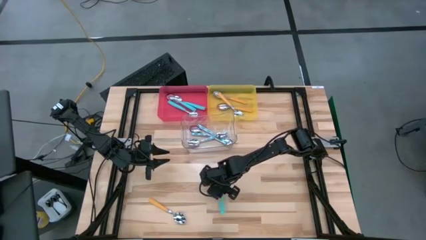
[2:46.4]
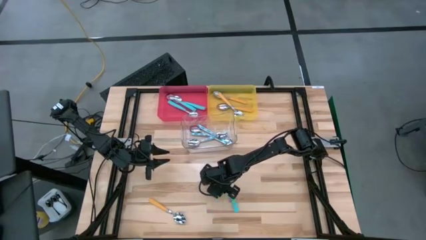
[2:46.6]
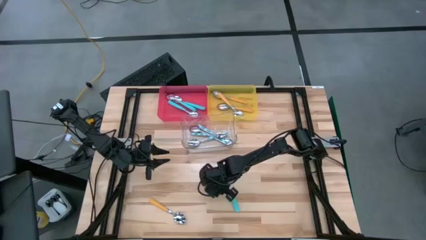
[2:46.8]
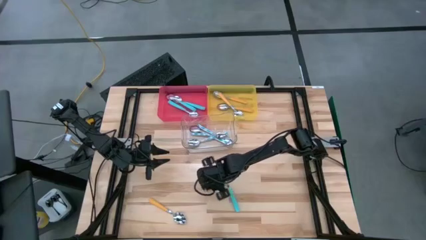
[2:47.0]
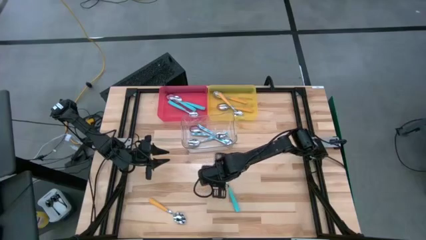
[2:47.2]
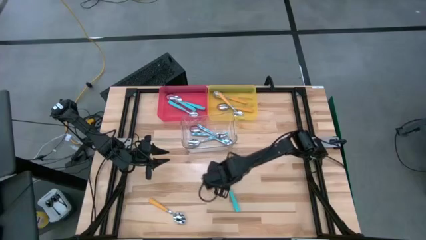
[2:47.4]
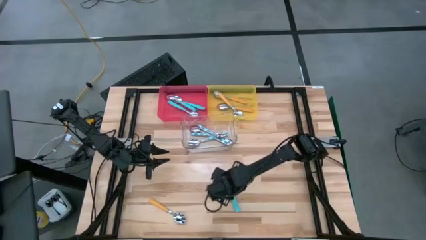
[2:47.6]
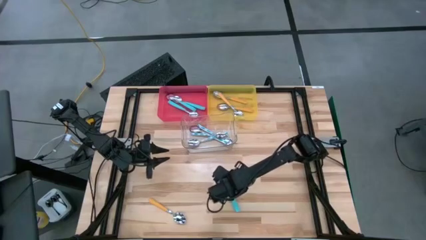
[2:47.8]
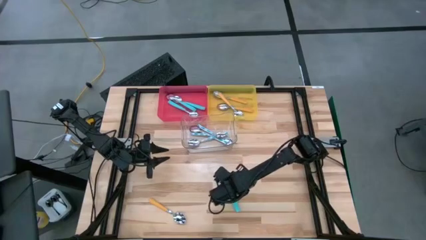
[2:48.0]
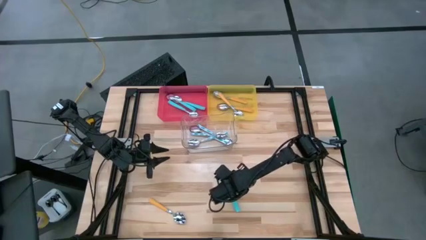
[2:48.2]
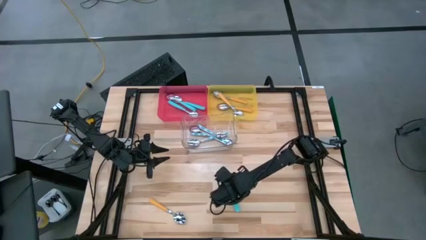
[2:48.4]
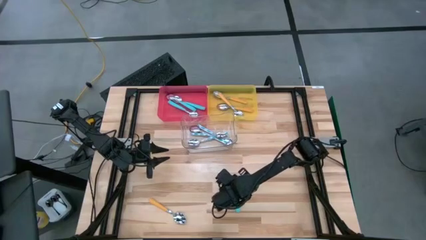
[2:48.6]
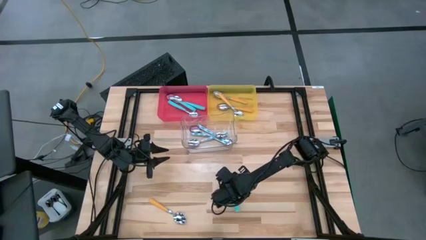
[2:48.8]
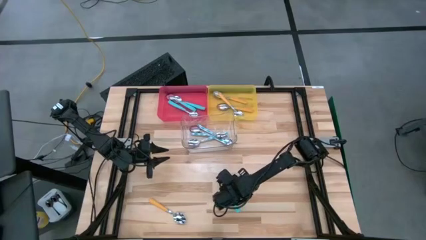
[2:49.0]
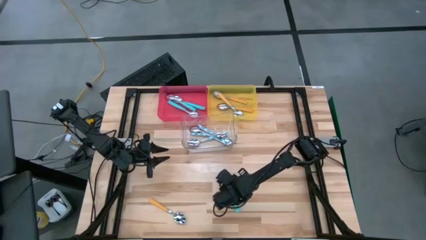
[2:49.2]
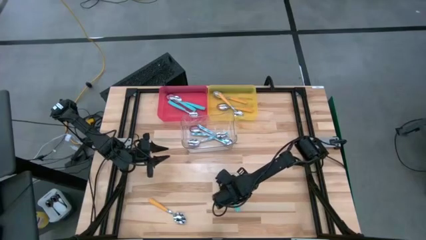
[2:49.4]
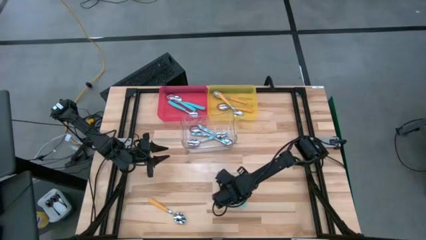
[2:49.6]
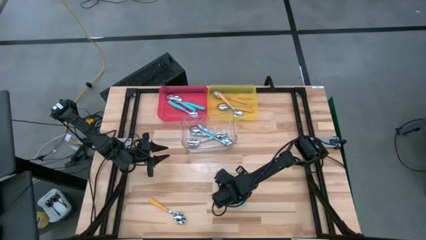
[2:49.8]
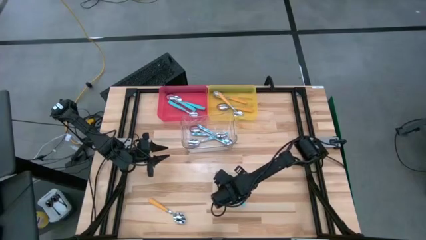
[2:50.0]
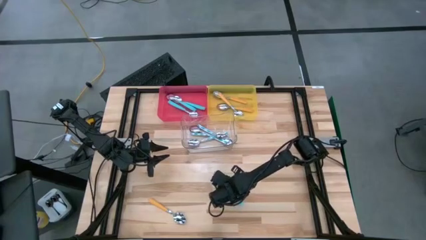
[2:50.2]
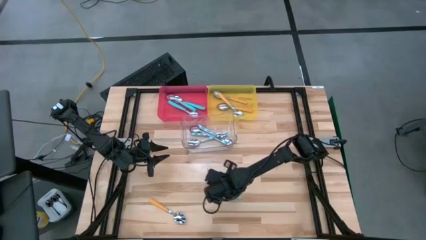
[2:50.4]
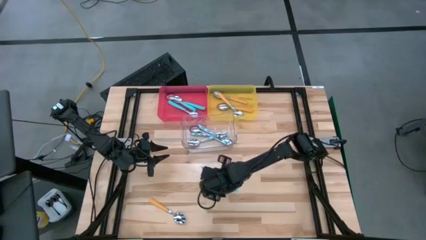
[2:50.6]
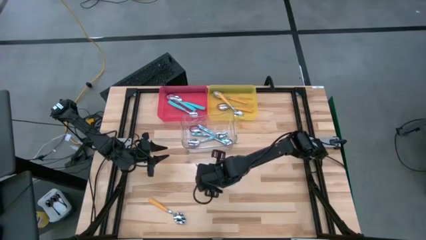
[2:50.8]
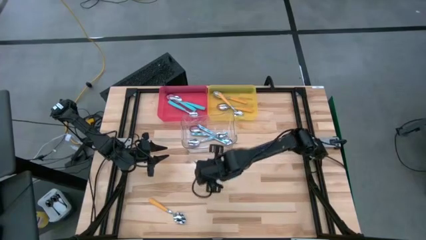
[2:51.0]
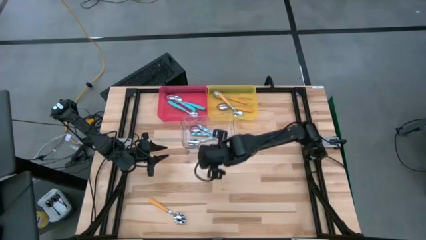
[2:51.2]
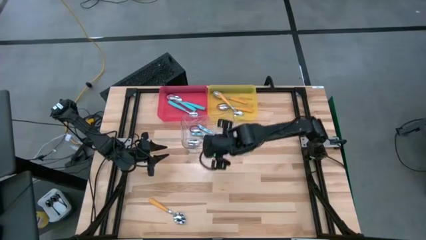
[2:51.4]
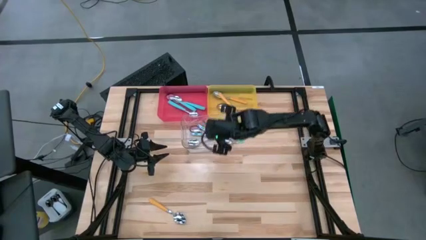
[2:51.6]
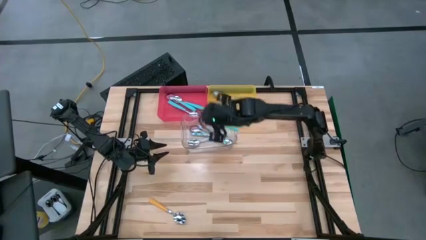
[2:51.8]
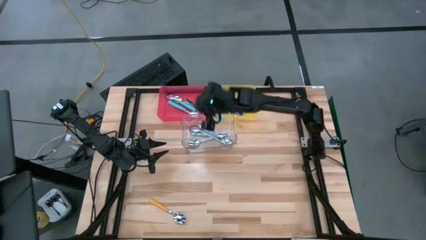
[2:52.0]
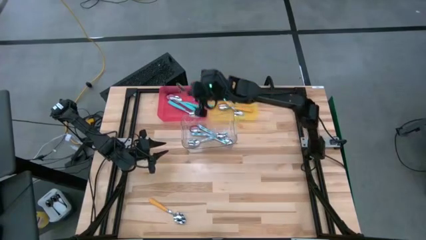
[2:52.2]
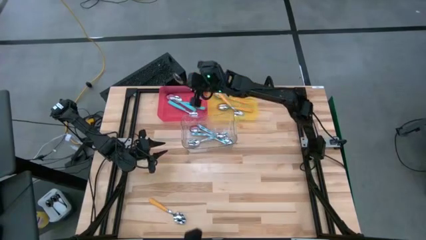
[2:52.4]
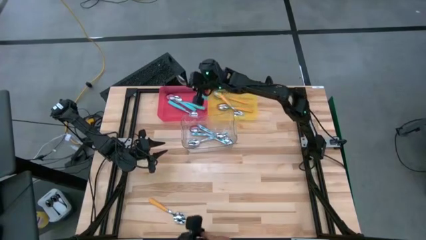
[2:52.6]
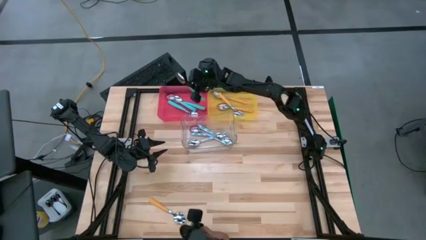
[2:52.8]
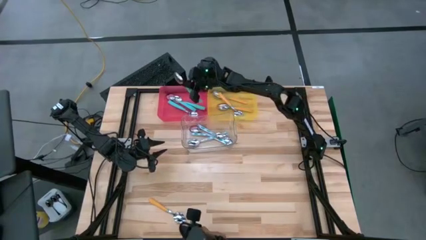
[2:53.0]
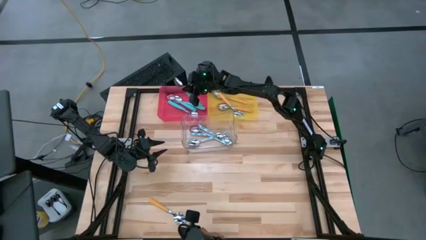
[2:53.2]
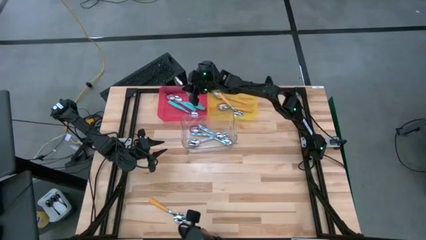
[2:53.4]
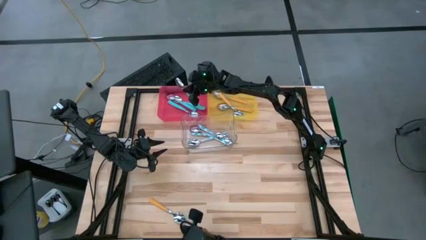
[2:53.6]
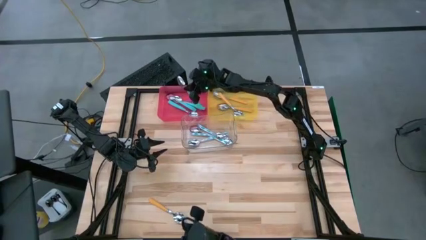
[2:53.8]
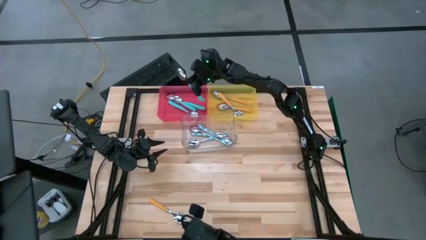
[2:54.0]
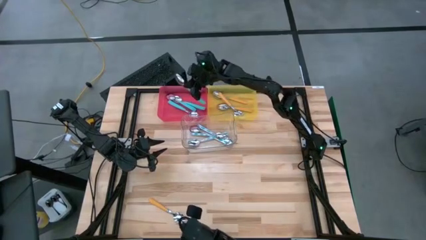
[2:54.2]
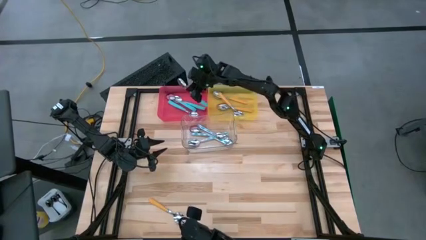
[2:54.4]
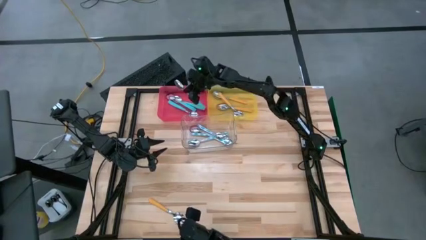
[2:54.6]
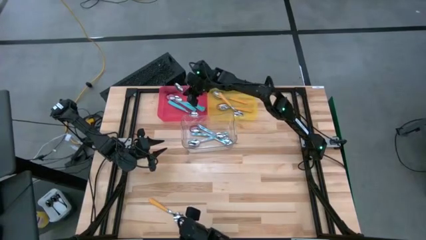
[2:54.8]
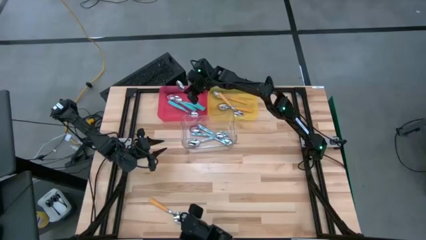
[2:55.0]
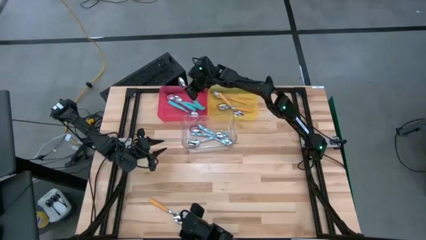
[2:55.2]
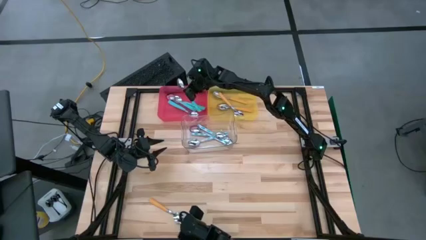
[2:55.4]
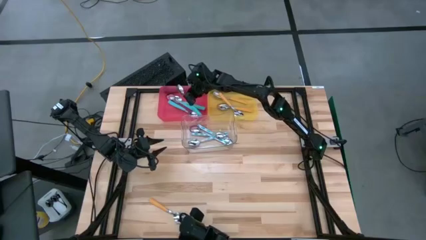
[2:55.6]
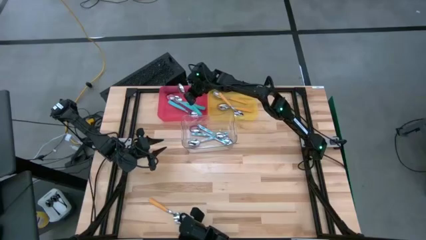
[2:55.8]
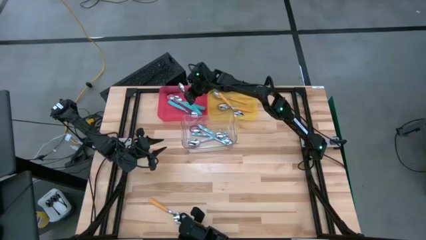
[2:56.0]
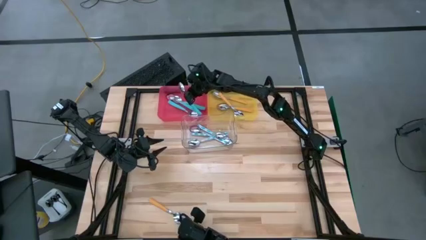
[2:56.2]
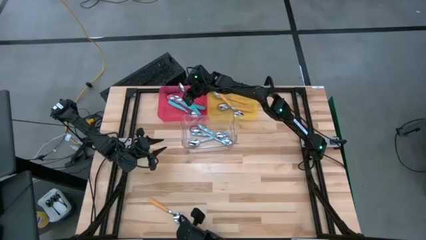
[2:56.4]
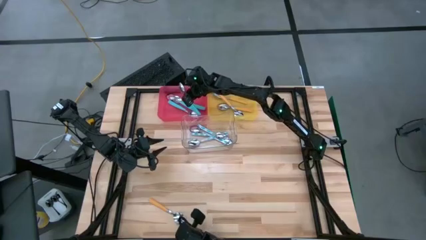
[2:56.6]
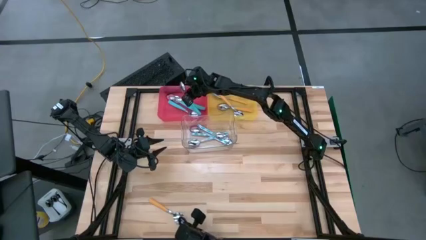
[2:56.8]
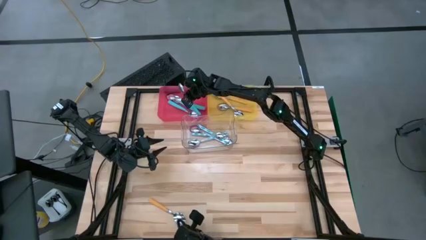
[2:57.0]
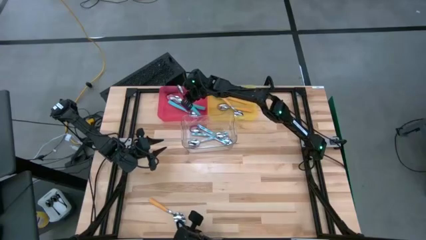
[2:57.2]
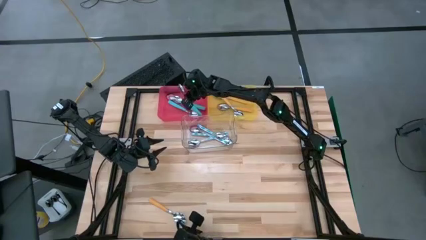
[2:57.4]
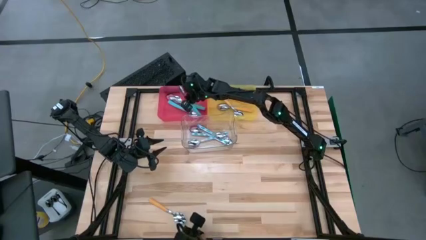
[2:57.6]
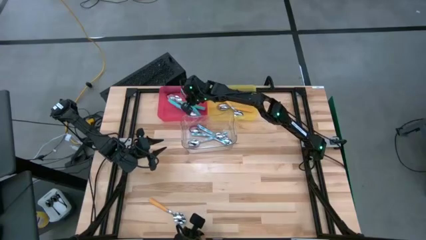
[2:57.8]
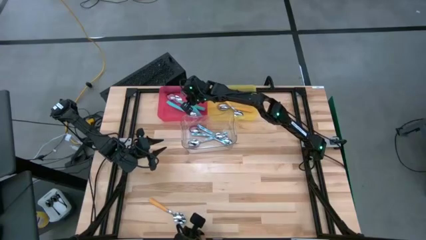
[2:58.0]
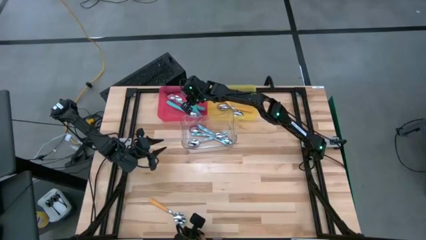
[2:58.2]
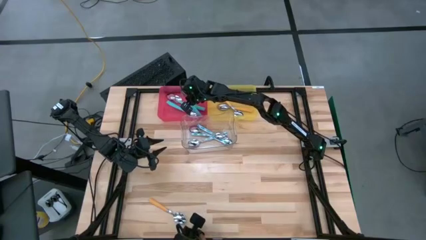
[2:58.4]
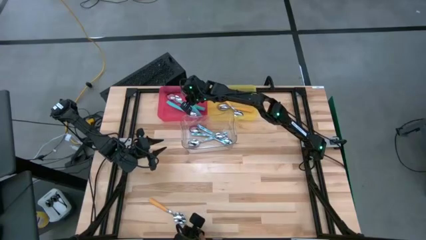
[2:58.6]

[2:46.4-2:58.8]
Task: Sort silverware by color (type)
Put the light green spoon into the red bin
